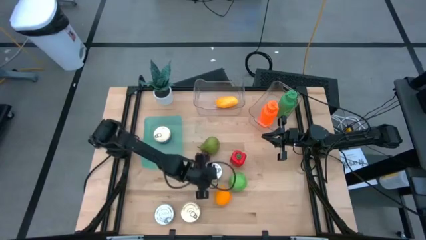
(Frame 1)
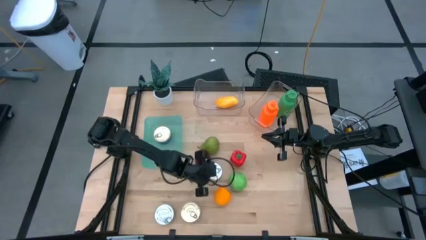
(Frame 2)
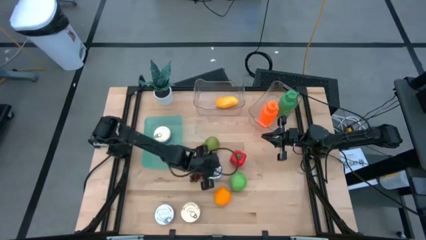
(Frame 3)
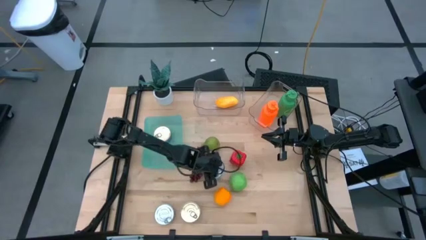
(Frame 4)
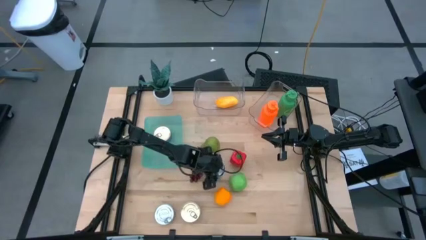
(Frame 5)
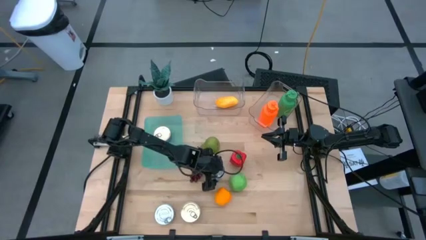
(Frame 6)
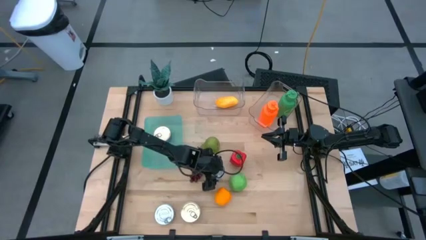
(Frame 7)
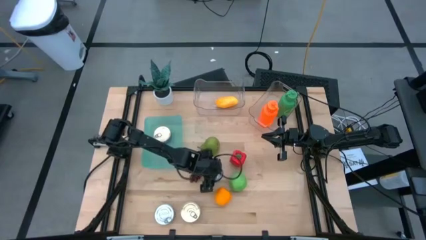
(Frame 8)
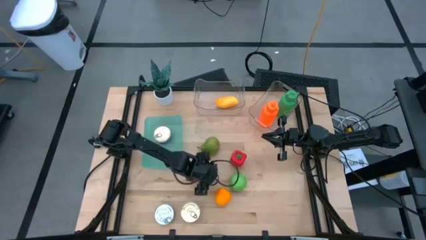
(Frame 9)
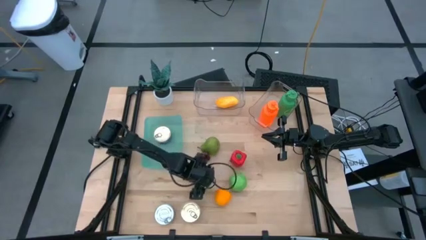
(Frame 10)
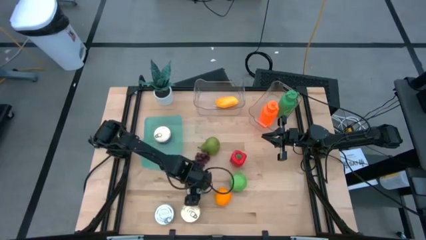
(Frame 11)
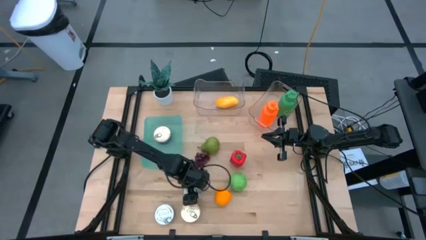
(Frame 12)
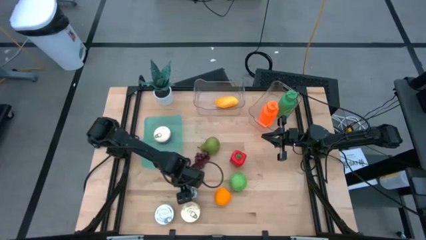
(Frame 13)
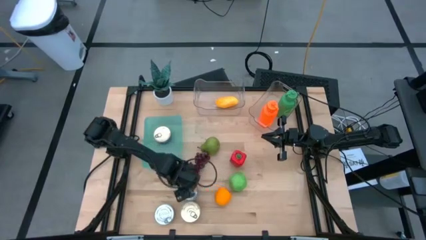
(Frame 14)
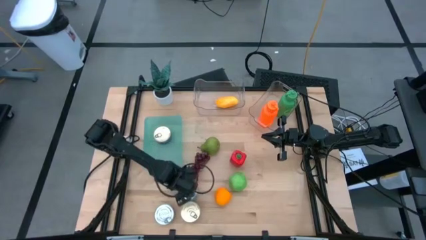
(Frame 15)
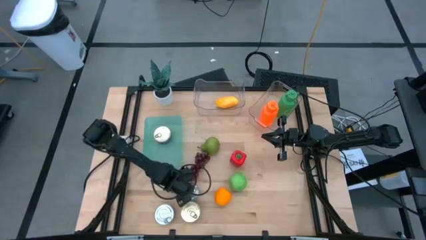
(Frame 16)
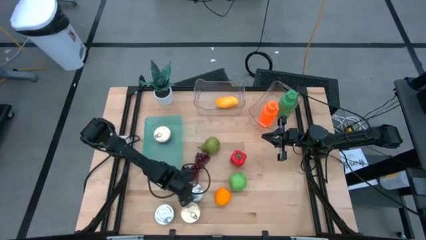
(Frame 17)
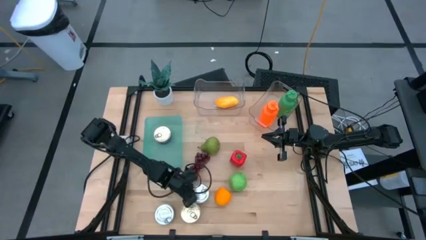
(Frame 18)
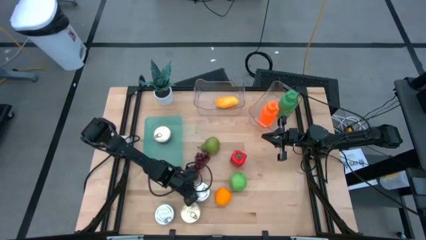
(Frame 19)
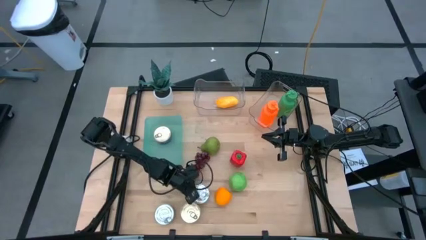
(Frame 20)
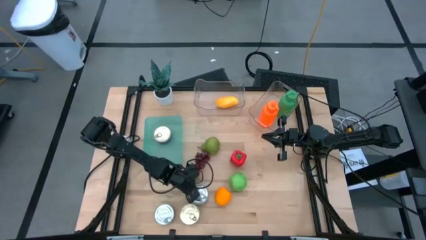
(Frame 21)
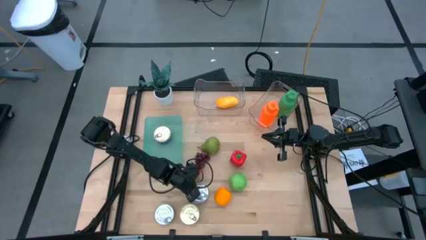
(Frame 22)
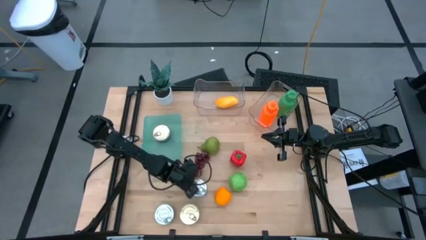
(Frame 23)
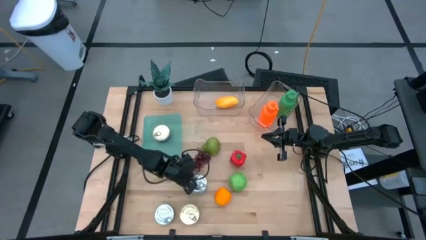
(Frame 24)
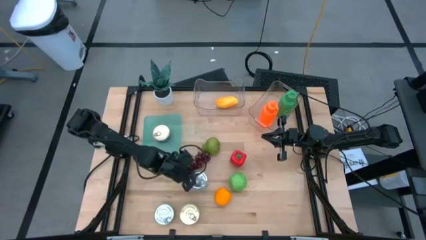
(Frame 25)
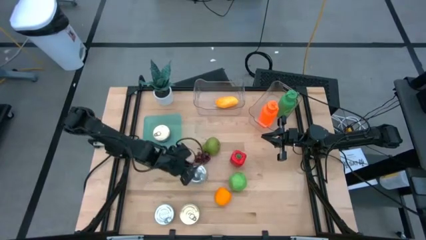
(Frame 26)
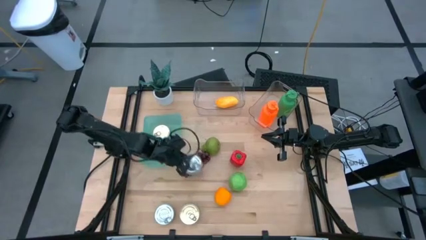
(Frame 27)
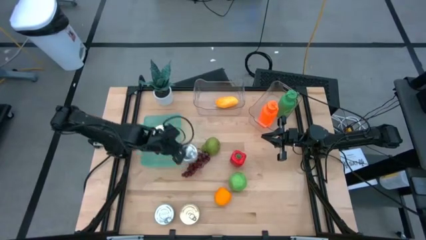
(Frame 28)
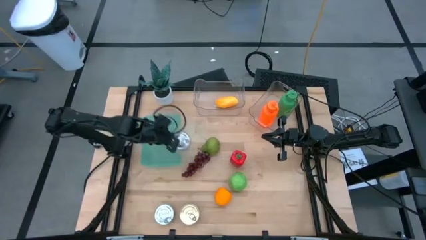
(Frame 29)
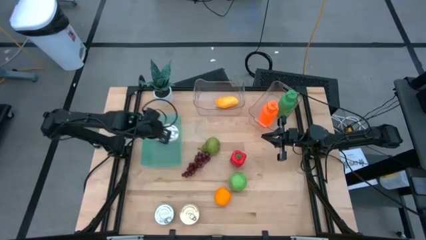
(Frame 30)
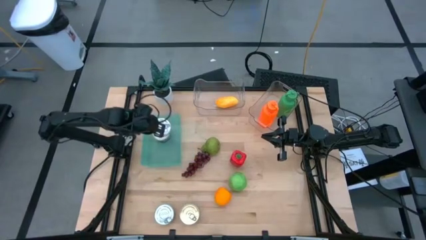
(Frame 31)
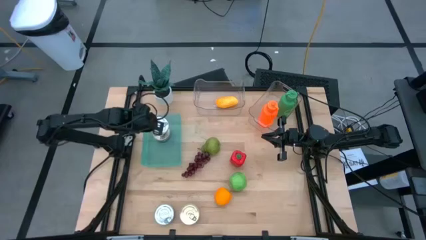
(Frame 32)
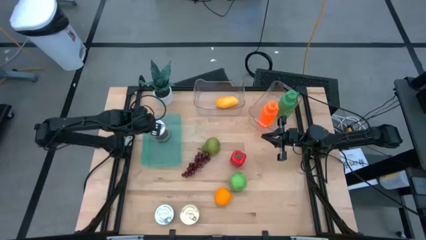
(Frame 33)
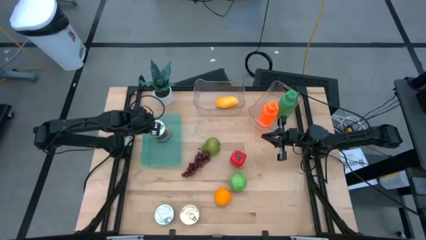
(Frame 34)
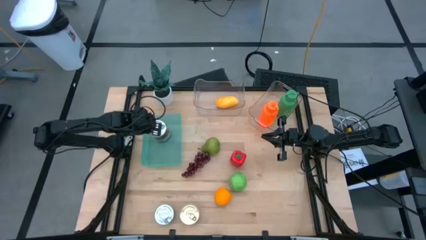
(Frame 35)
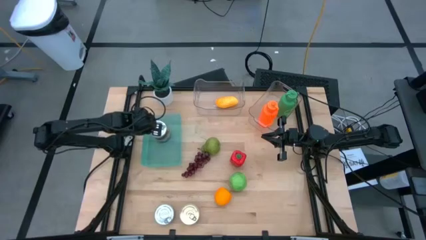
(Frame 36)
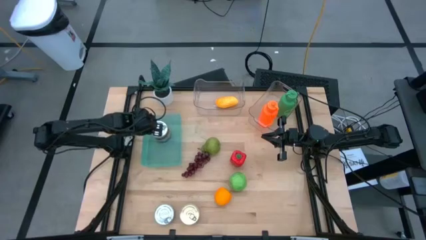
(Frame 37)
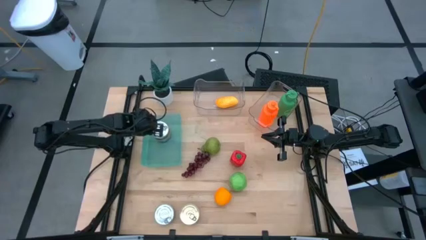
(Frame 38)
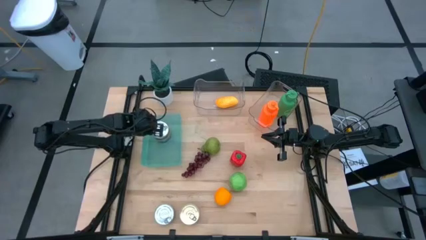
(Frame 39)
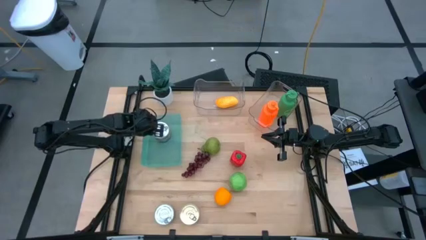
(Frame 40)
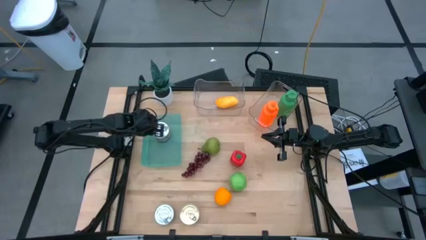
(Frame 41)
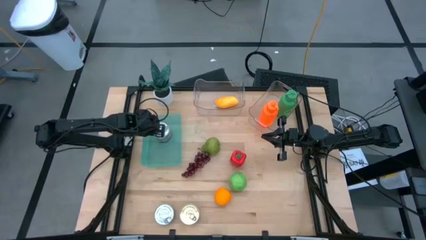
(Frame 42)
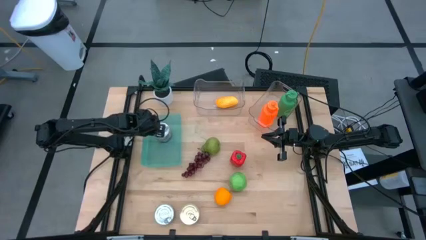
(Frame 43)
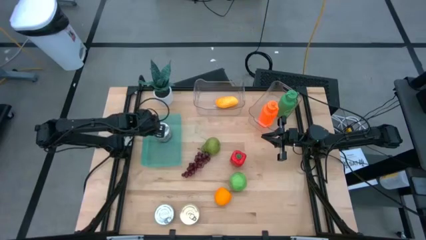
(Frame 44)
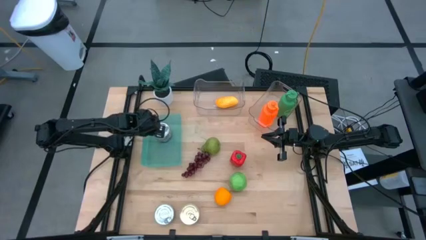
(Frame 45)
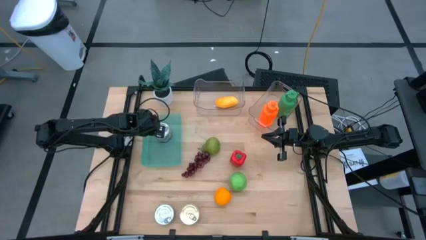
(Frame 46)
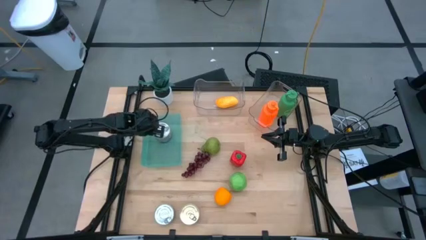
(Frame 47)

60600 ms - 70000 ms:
Task: Pick & Place Food Item
Put the green tuna can into the green bin

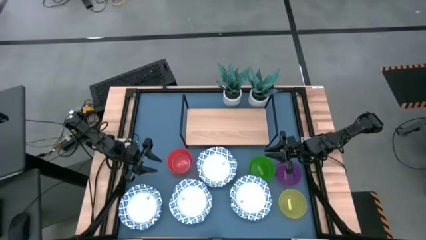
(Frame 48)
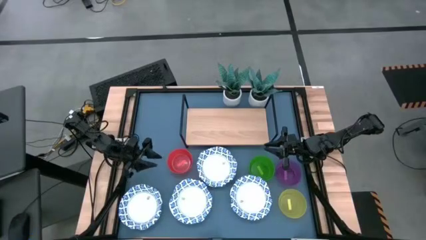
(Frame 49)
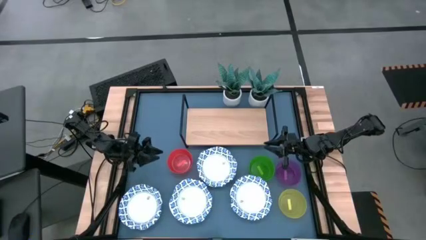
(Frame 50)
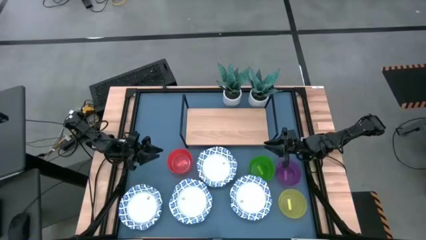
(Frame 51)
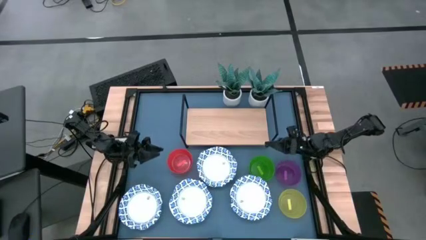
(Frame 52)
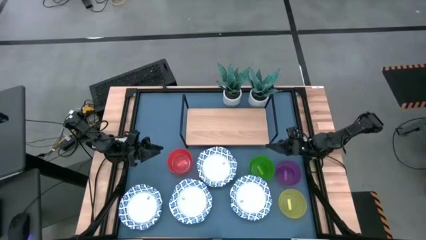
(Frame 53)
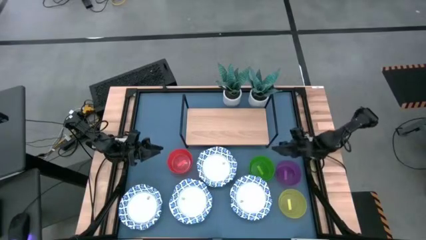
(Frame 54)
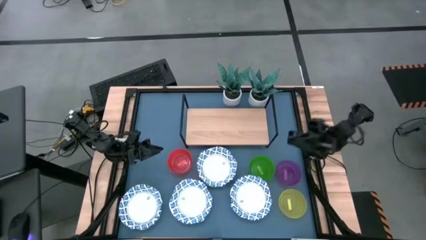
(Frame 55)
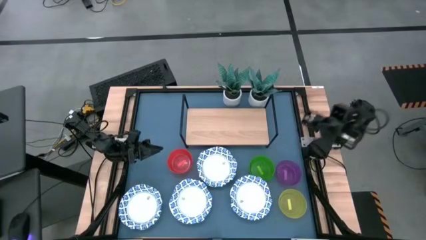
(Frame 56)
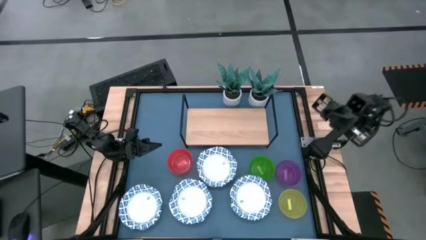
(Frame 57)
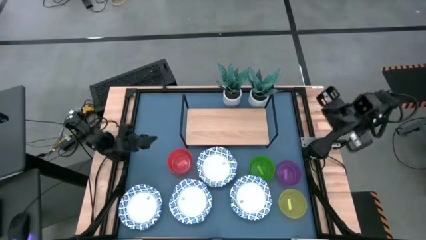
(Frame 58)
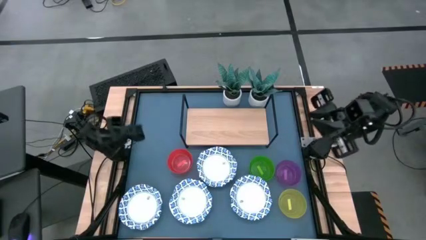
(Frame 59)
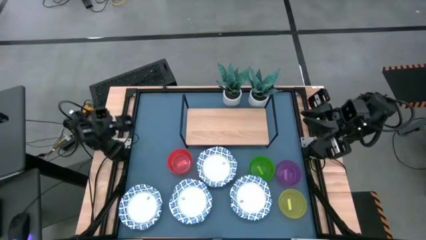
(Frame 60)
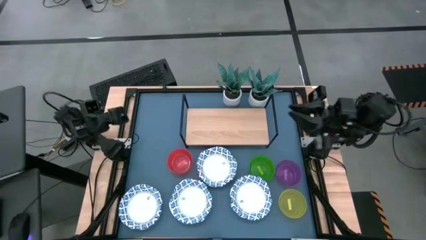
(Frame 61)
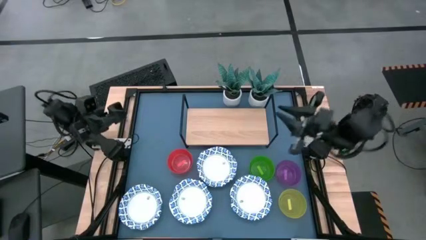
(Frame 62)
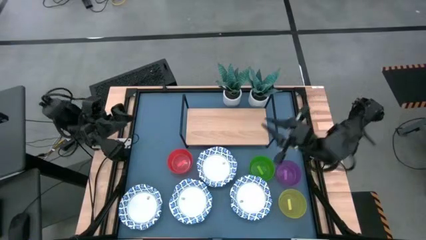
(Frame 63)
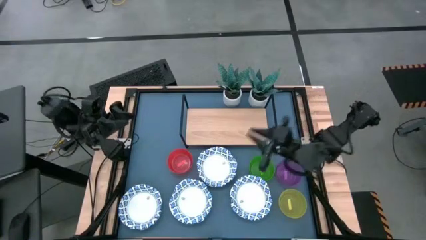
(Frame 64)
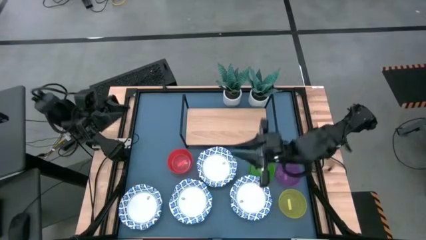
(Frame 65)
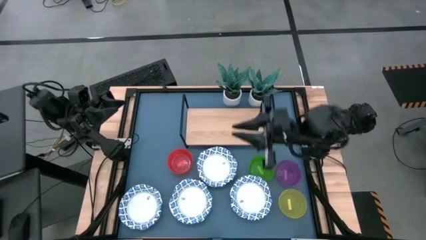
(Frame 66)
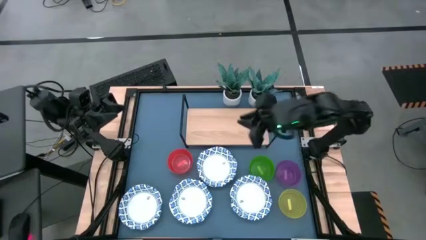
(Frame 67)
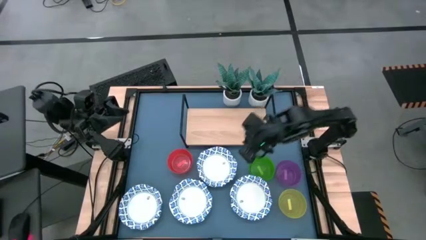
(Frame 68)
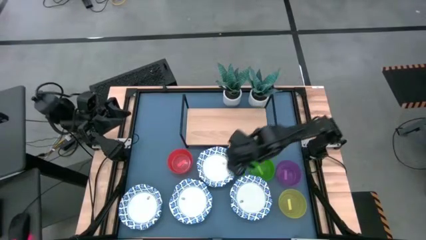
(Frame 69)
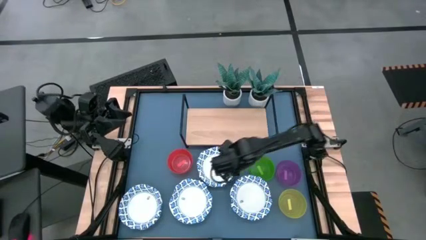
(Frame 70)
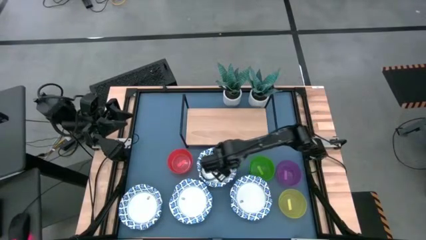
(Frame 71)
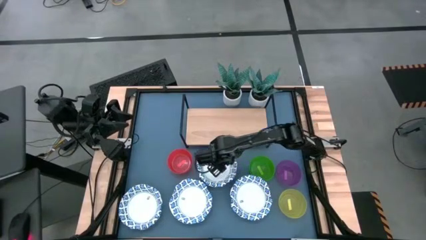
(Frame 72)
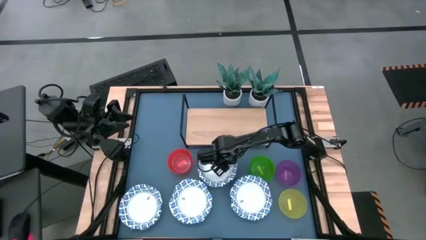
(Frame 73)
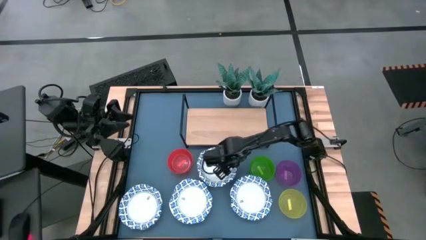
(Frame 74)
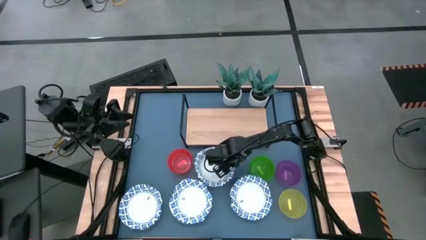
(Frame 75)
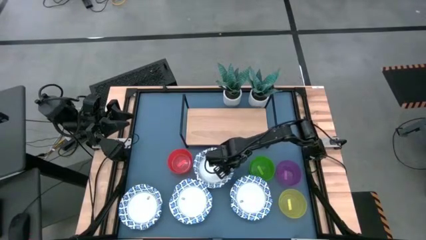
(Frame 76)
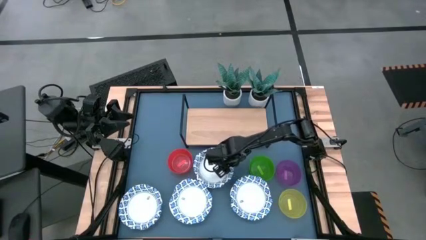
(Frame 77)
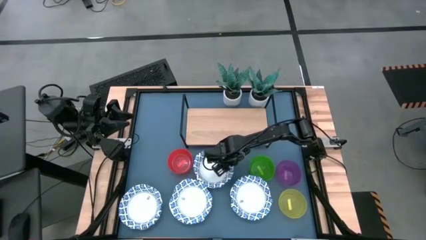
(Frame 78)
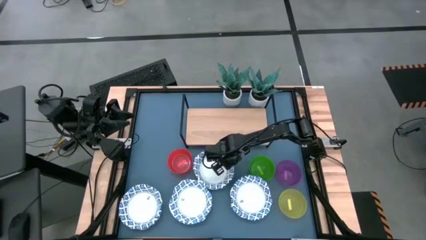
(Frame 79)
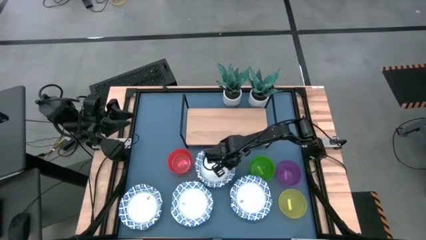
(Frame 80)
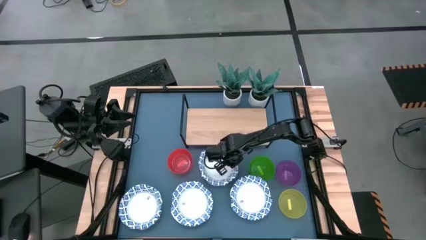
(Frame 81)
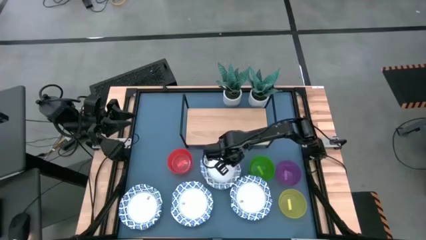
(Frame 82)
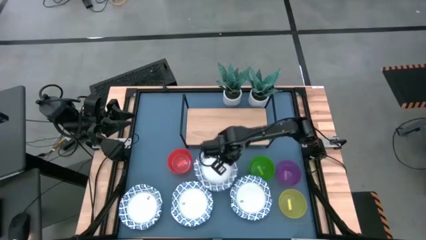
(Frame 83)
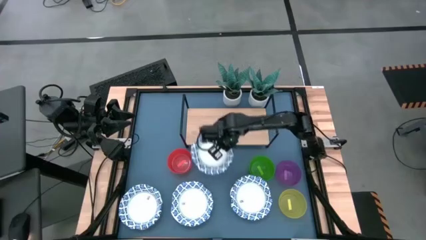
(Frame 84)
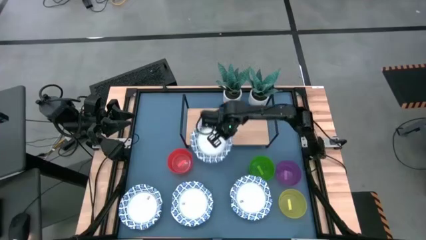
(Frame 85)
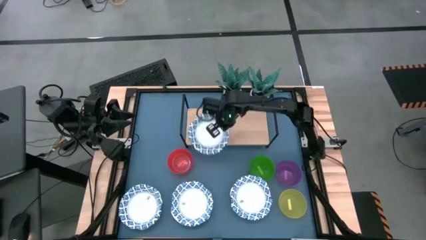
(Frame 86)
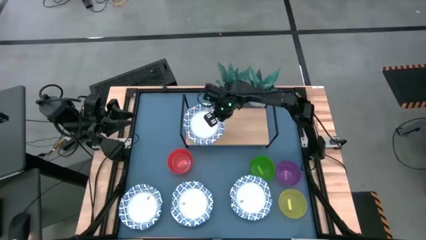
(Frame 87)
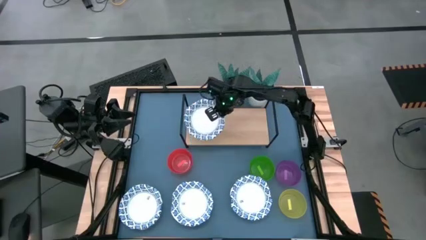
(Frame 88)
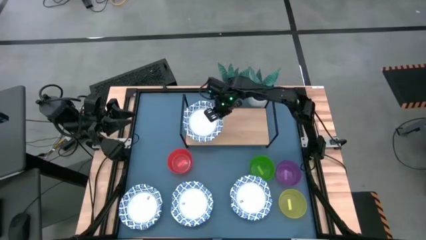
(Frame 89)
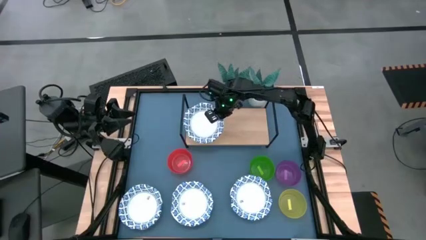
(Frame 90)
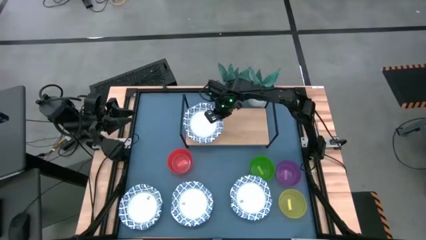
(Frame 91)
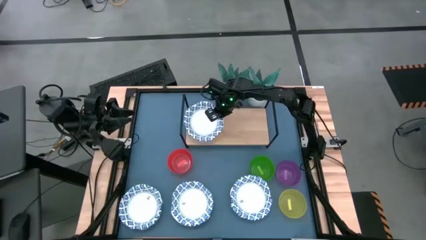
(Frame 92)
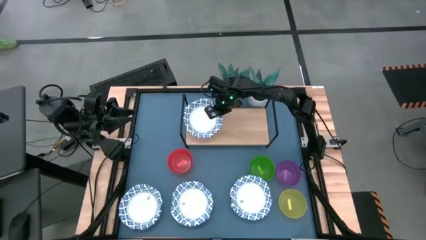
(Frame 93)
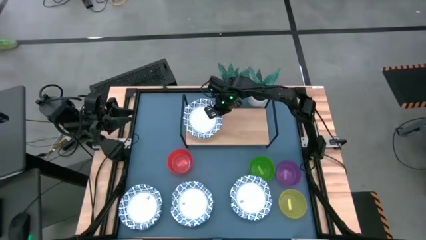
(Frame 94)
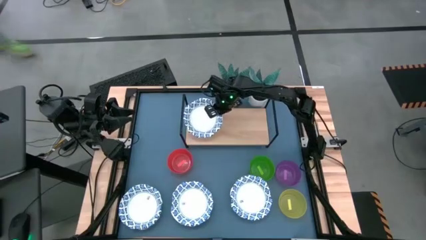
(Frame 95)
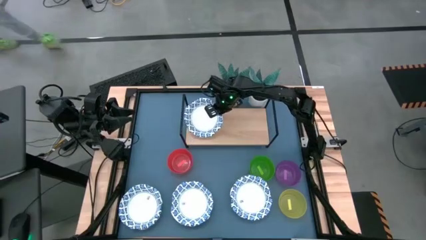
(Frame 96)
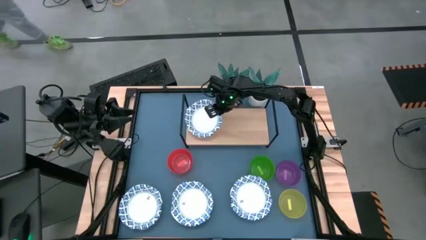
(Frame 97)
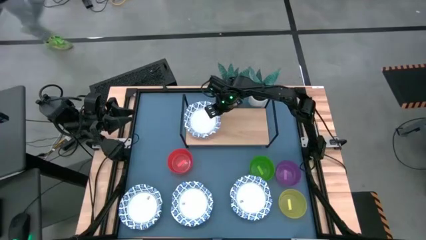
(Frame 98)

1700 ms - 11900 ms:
Task: Place and stack bowls onto a shelf
Put the top center white and blue plate on the shelf
